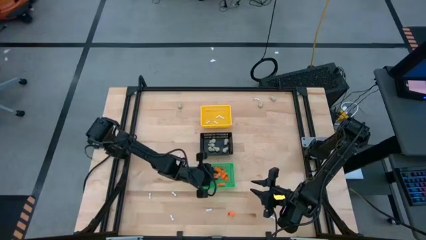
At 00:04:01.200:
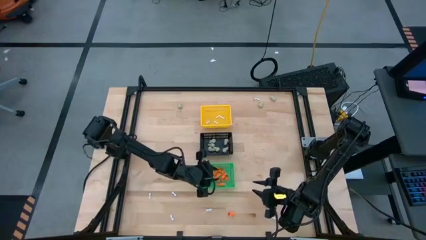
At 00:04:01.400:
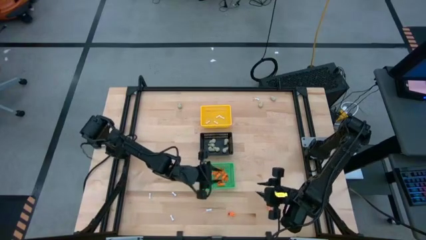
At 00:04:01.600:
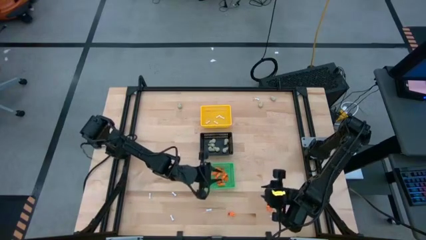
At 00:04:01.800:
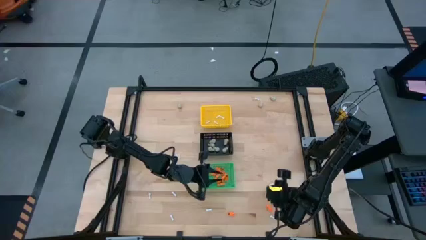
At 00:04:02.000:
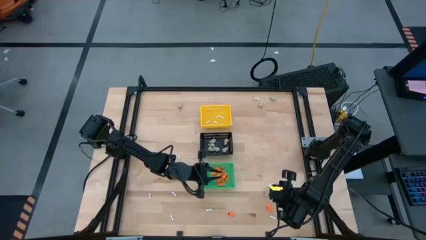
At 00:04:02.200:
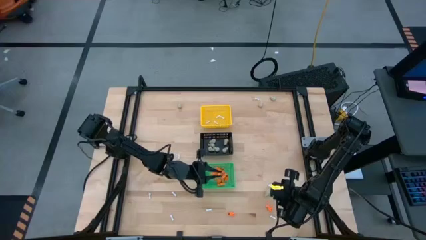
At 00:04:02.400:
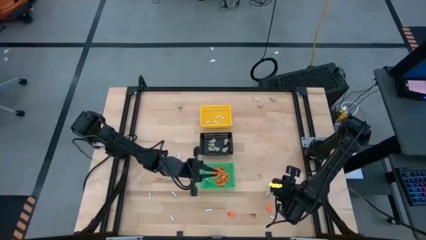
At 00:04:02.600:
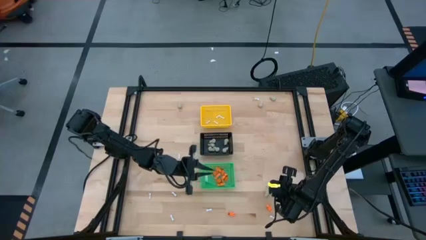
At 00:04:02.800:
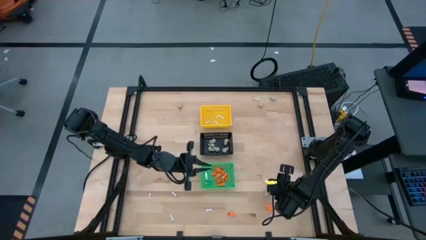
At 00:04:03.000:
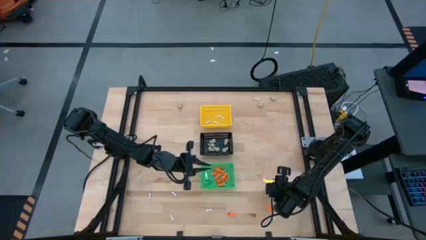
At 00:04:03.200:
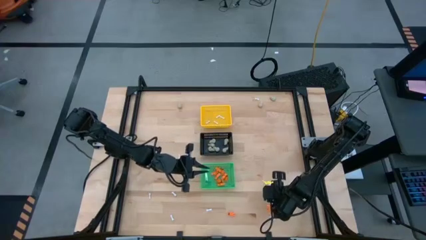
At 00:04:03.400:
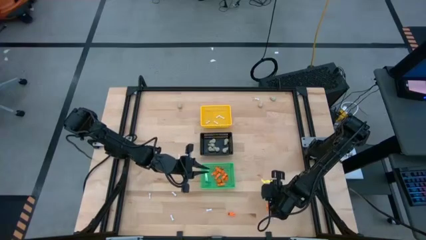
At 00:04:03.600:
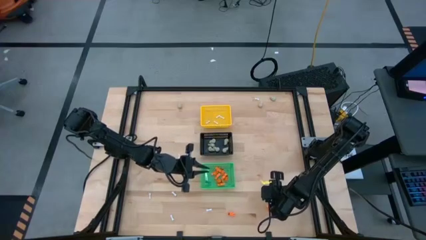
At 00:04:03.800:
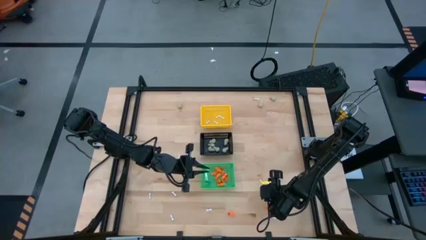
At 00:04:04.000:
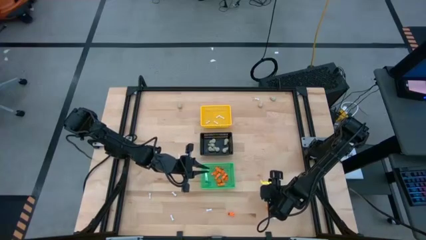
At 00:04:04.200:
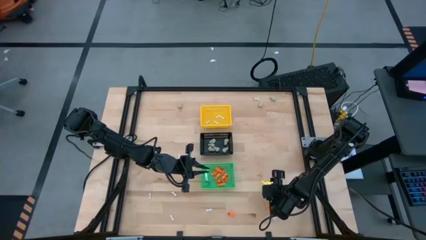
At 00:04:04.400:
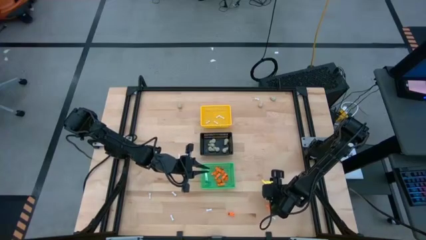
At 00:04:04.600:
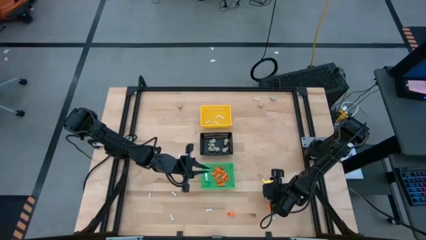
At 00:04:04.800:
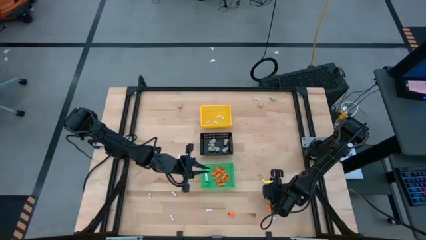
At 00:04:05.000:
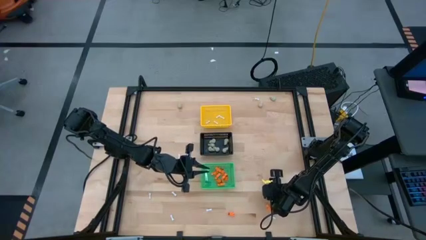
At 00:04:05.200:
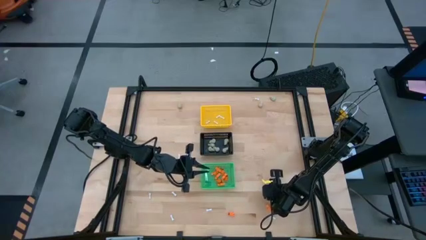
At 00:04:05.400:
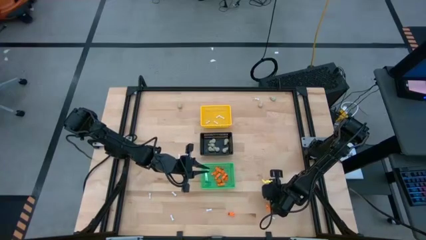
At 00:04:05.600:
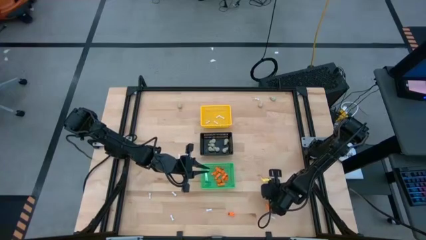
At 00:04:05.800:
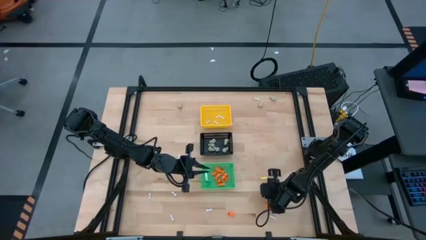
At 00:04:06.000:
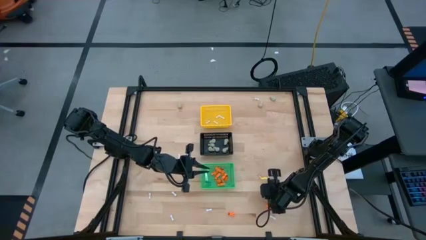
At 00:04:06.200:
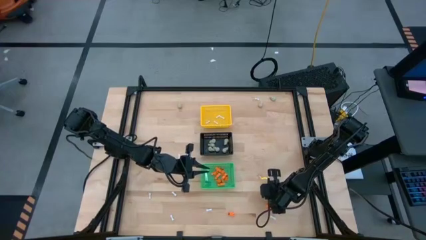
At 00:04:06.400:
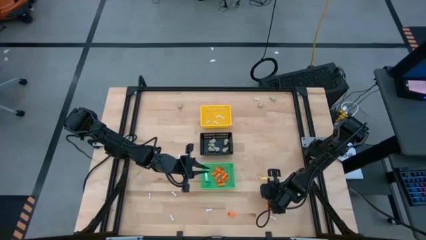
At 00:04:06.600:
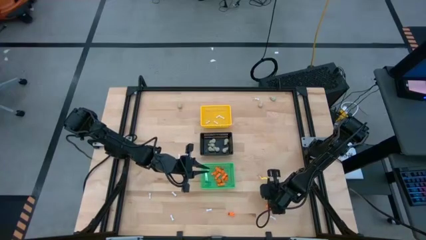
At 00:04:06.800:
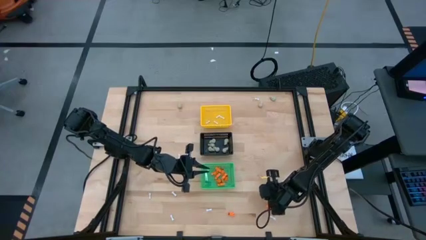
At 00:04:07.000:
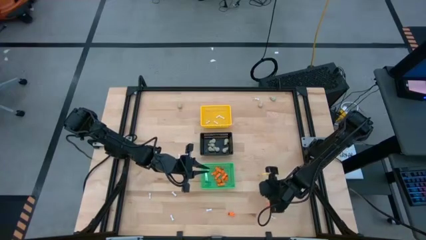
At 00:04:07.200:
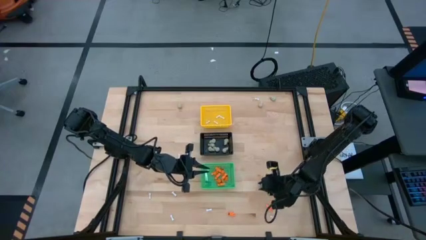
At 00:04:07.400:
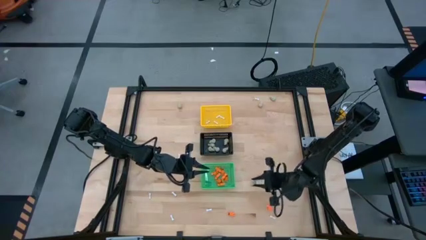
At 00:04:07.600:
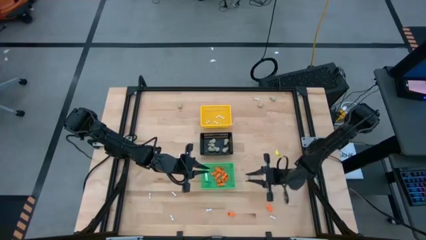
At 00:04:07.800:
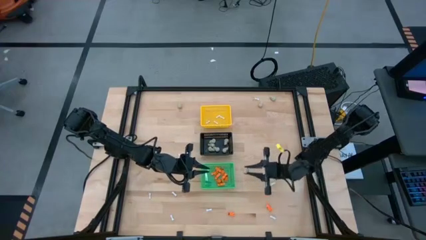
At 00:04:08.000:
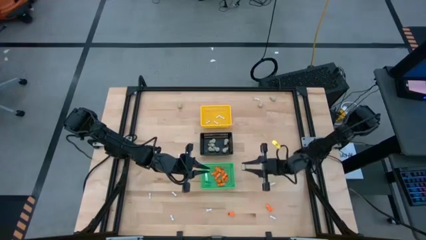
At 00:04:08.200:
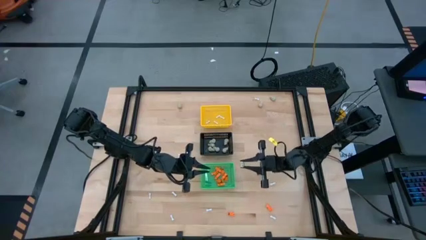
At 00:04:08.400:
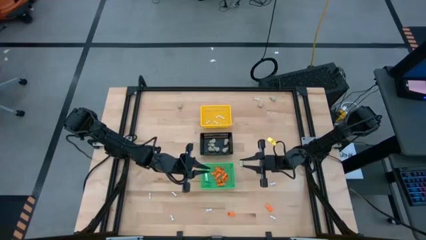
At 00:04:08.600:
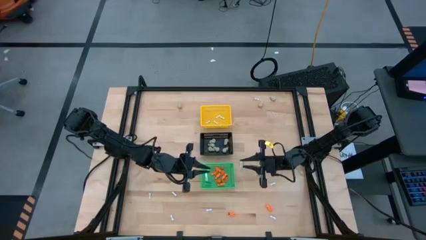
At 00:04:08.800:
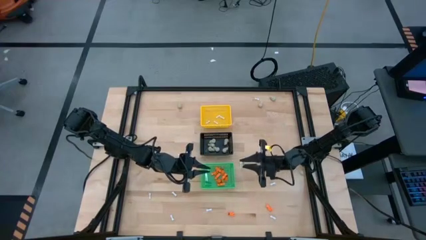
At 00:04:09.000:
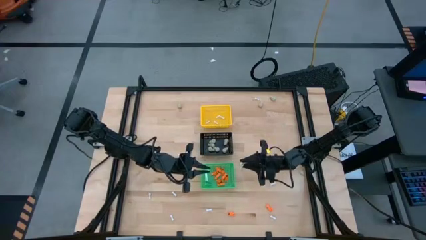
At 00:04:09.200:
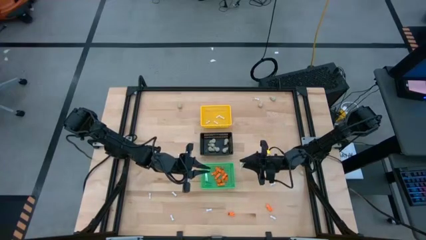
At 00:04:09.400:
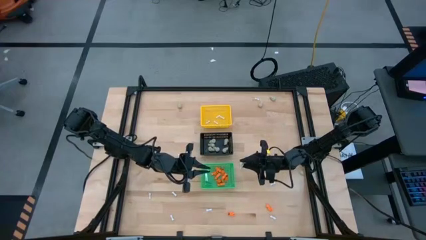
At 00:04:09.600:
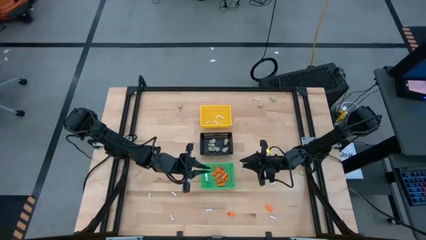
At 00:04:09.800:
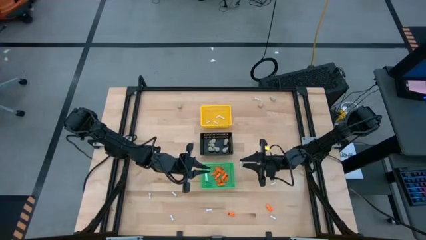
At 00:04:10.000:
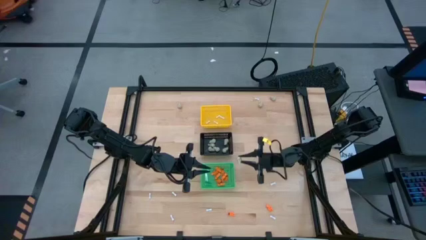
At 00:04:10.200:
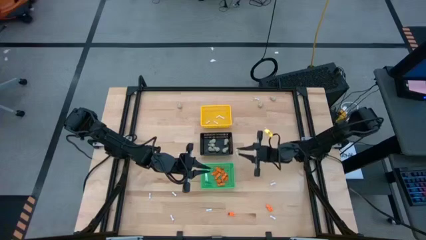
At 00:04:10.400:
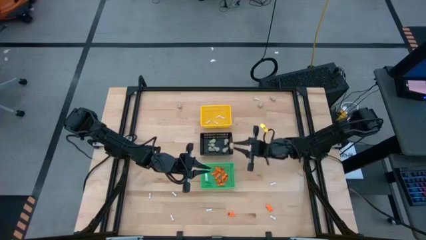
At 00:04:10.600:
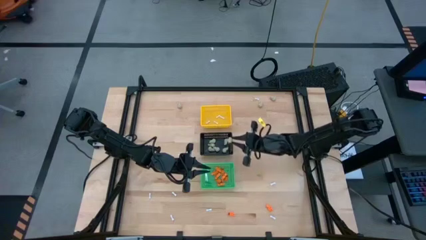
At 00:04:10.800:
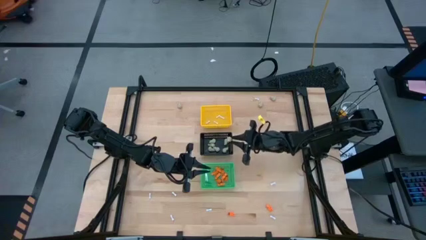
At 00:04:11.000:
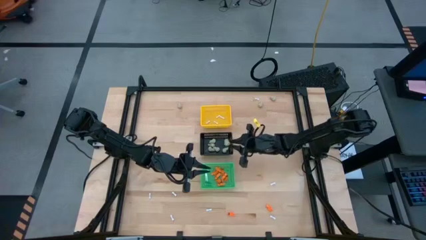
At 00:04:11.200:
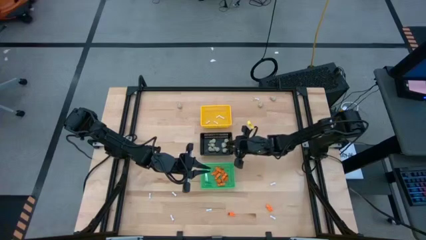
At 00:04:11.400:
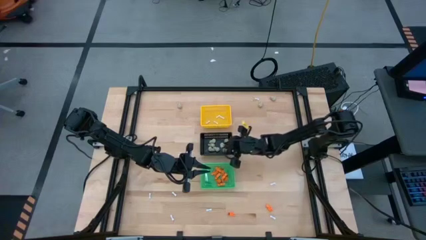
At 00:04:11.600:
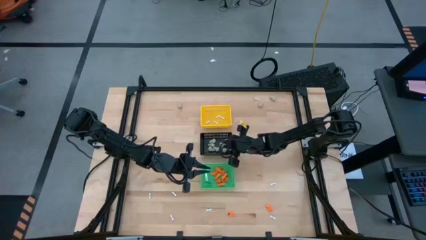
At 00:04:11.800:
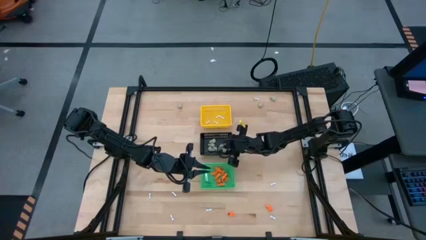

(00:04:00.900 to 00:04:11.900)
Task: Sort Halloween decoration
Put the gray skull toy into the black basket
